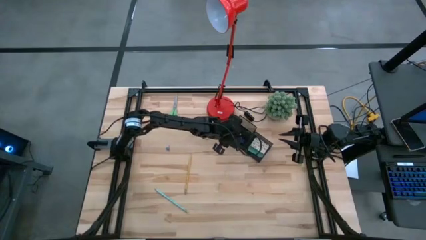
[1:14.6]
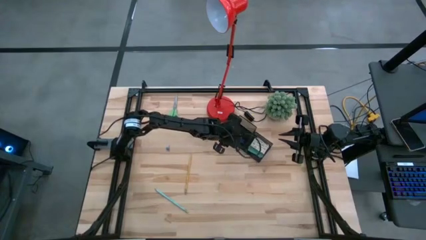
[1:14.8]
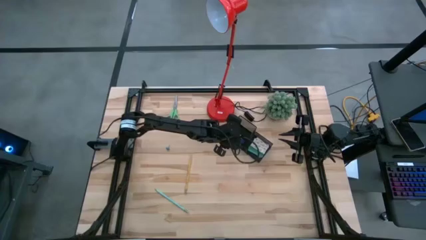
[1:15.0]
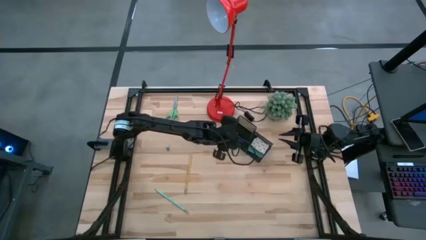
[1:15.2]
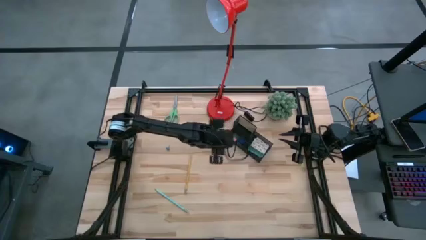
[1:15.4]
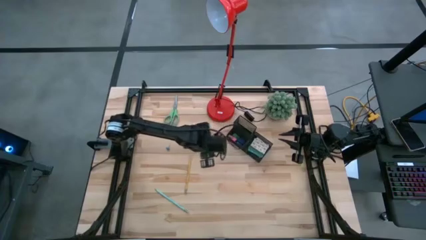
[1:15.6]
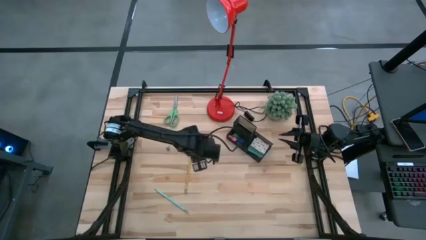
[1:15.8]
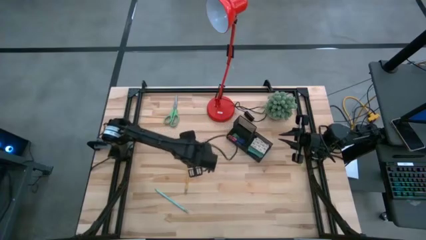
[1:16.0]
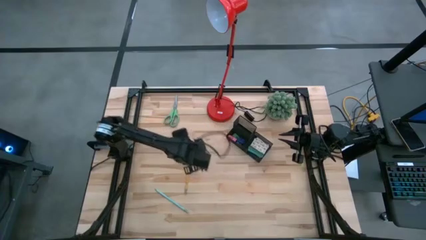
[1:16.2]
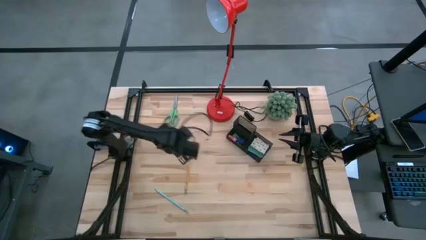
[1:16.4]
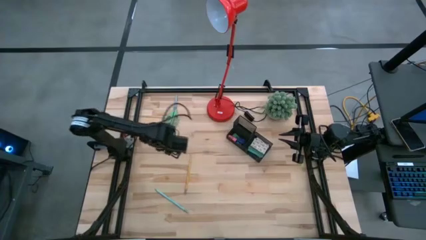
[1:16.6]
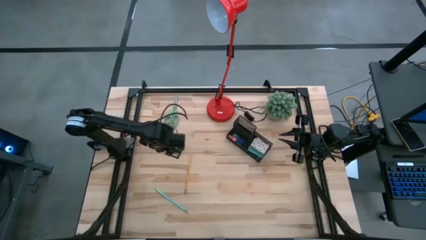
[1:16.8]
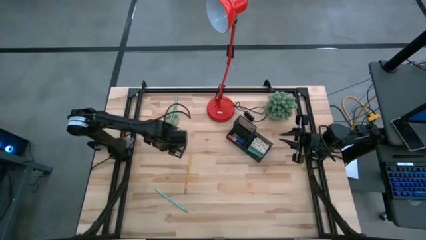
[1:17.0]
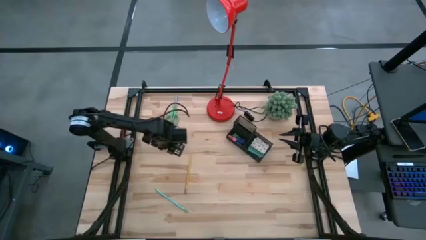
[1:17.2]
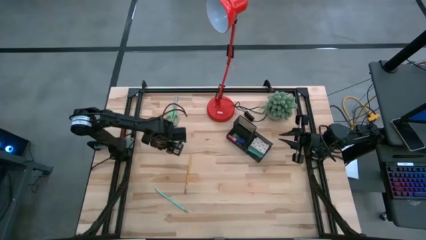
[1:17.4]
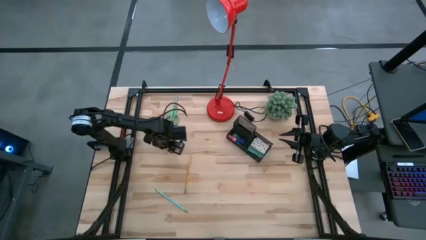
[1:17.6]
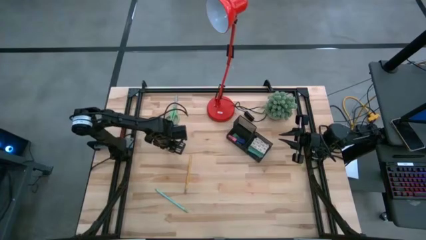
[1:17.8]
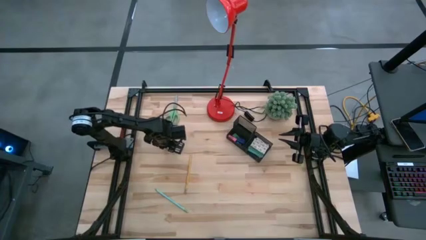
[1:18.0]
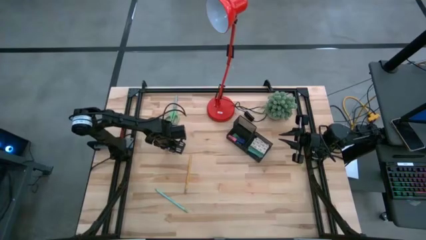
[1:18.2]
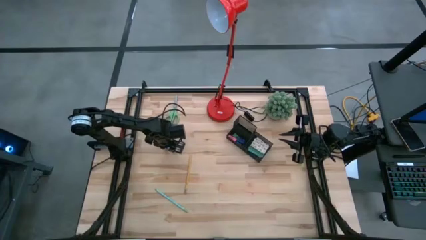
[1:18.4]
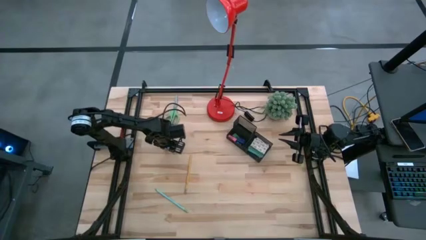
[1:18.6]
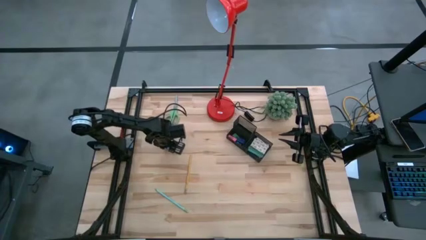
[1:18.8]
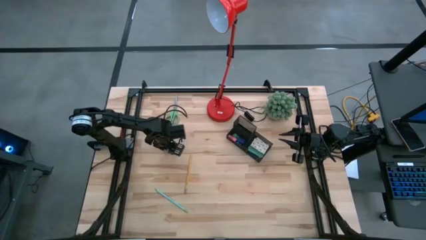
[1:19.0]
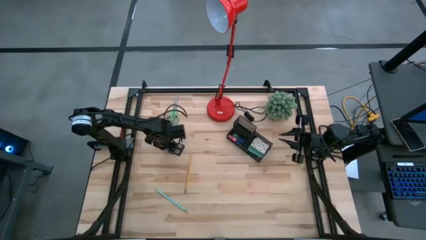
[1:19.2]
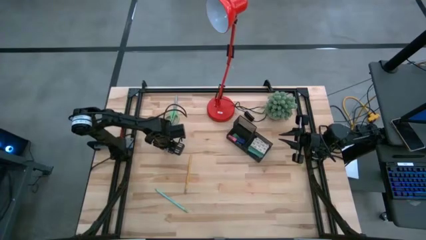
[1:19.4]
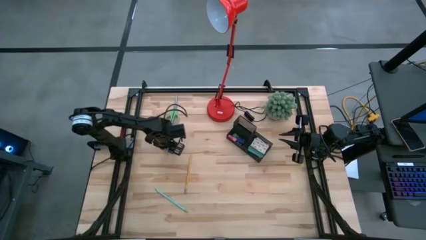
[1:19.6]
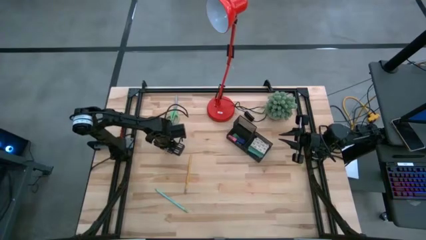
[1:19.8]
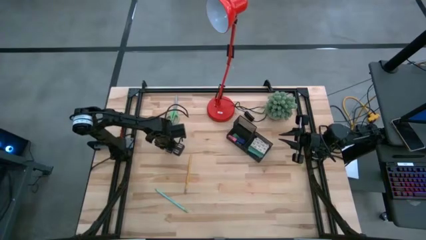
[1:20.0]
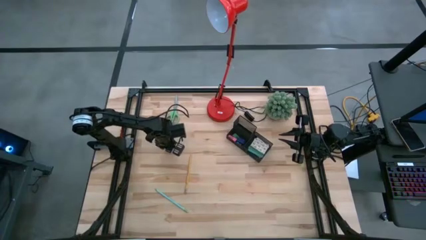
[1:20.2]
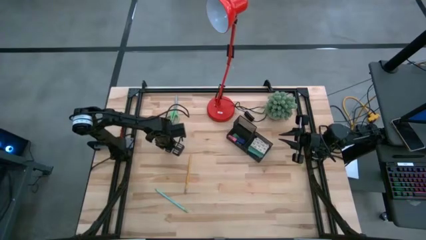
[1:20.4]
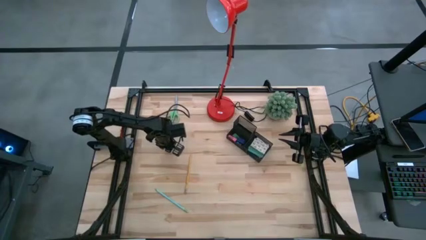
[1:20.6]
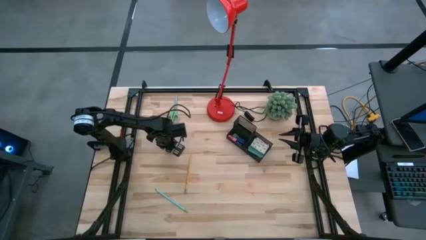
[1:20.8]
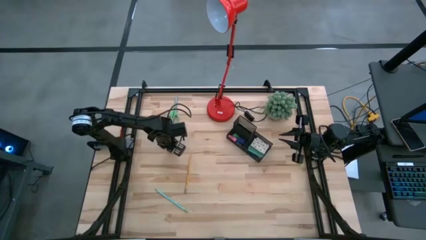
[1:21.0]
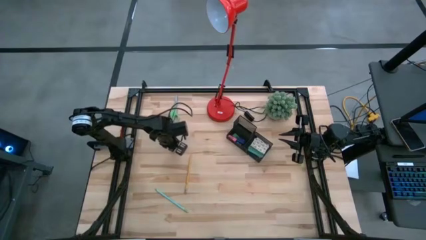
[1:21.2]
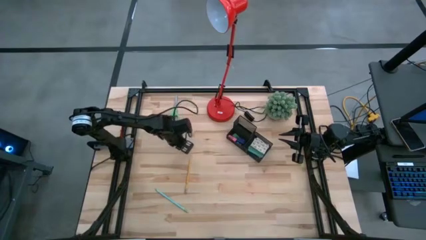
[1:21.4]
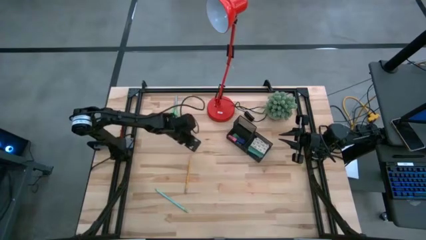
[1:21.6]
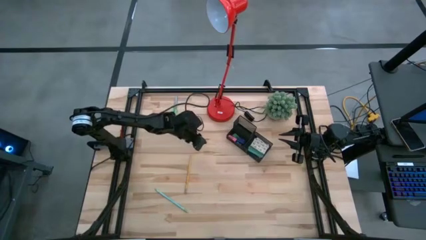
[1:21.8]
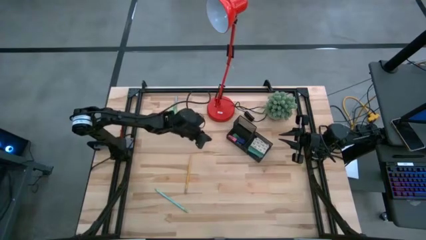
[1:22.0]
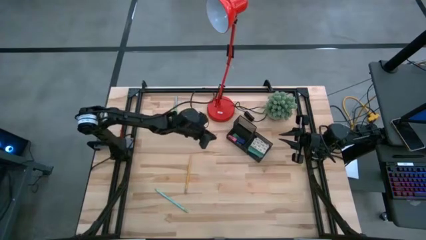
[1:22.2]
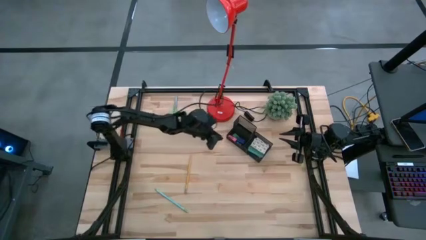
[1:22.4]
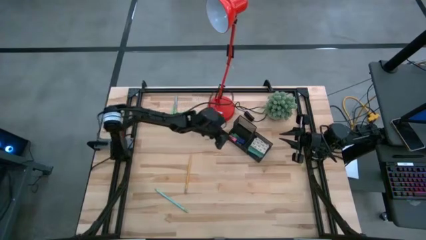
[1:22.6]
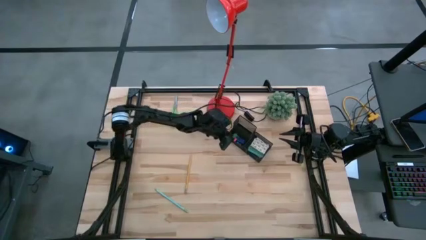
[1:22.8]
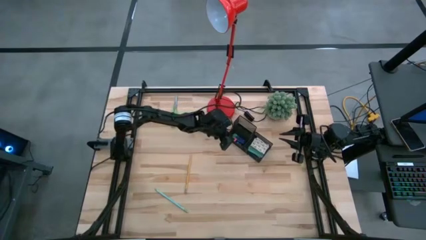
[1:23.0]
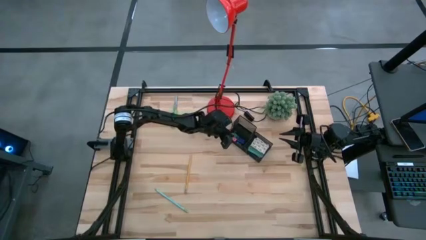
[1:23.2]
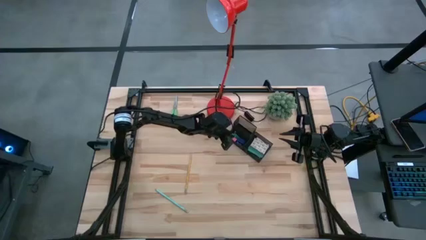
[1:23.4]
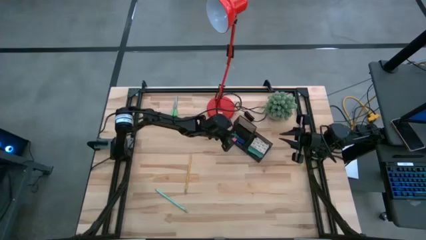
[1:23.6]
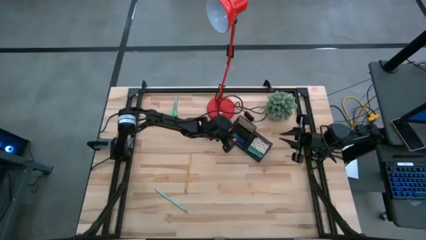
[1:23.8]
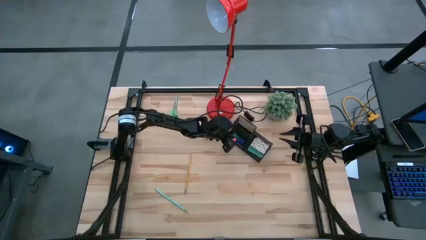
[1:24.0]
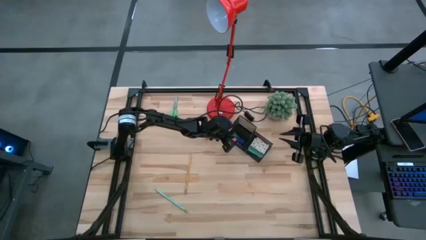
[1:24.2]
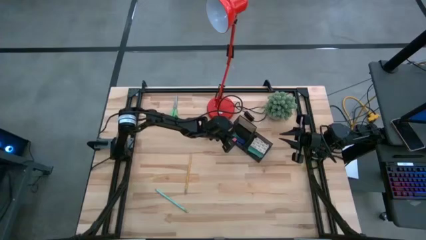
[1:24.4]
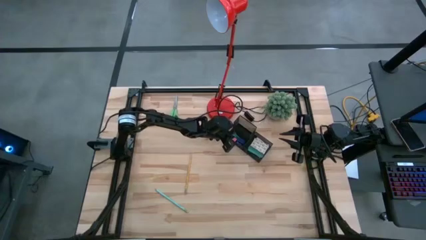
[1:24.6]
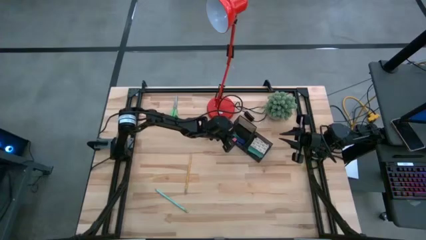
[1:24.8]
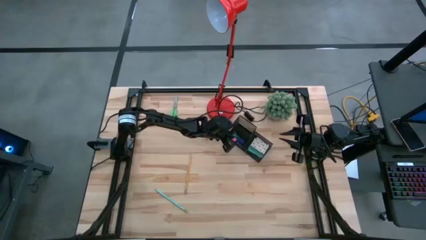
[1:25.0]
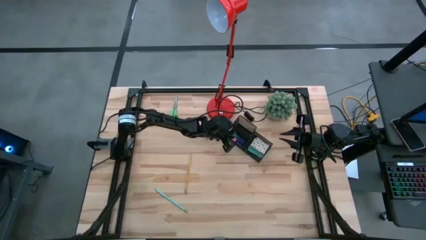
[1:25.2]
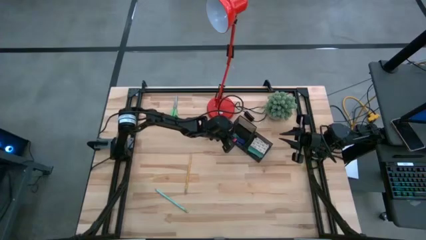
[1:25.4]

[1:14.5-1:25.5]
Task: Pick and place office supplies into organizer
Put the binder clip into the desk organizer

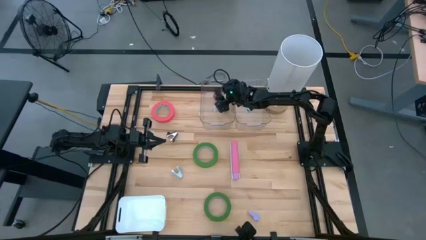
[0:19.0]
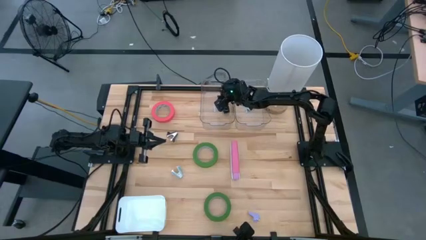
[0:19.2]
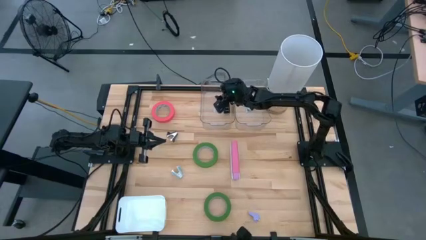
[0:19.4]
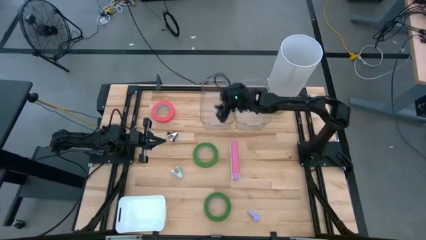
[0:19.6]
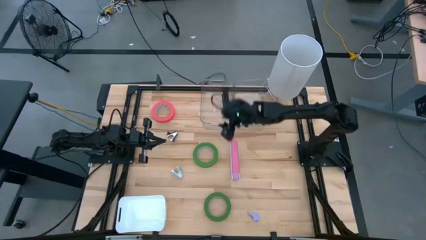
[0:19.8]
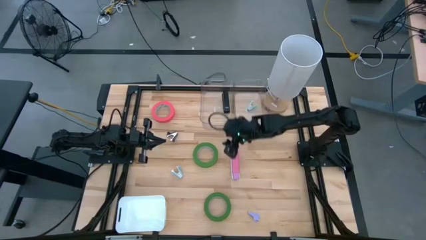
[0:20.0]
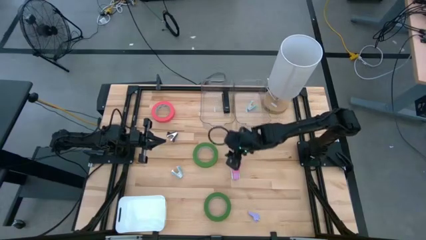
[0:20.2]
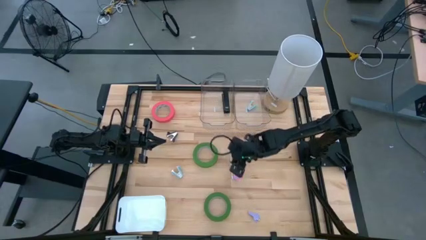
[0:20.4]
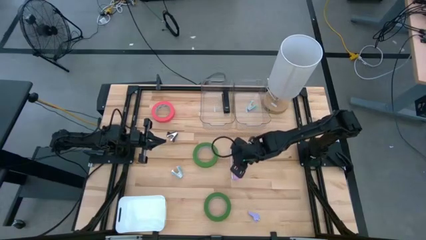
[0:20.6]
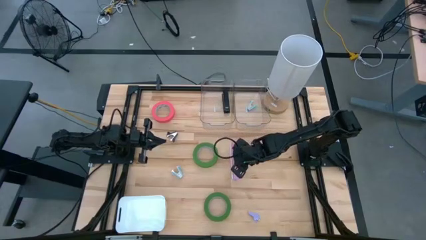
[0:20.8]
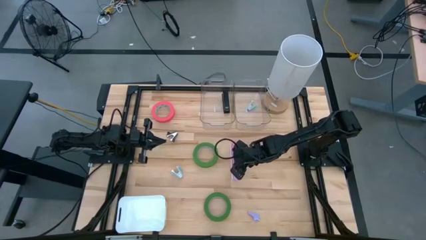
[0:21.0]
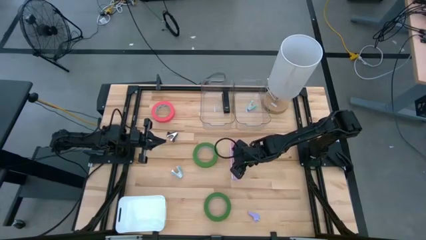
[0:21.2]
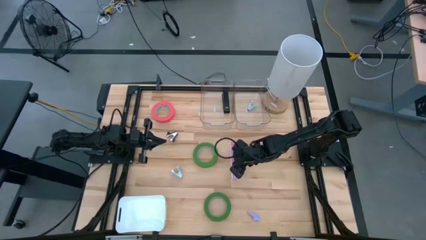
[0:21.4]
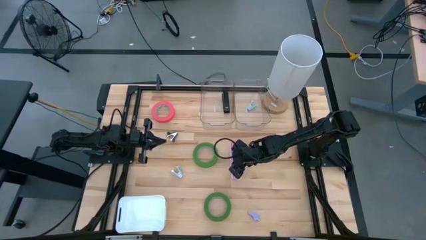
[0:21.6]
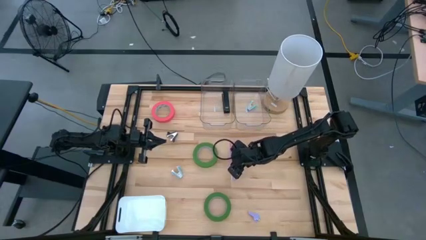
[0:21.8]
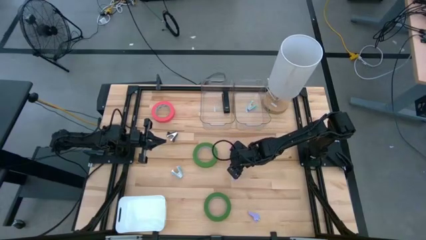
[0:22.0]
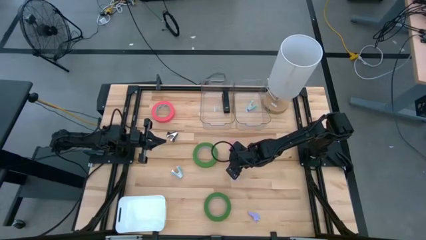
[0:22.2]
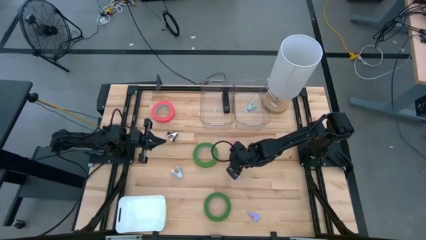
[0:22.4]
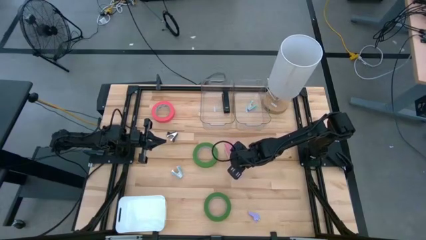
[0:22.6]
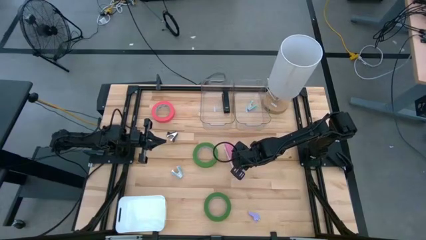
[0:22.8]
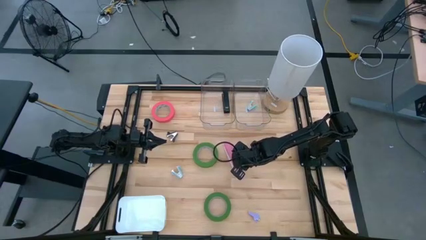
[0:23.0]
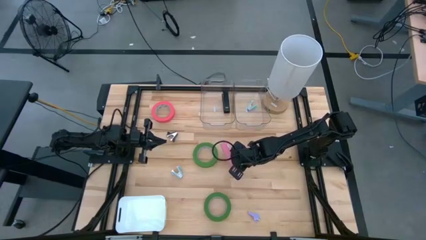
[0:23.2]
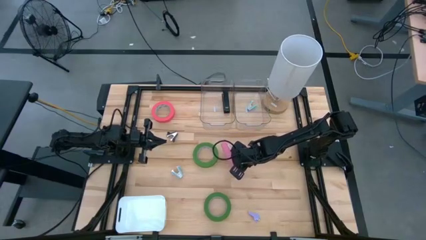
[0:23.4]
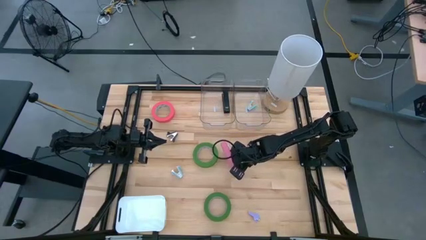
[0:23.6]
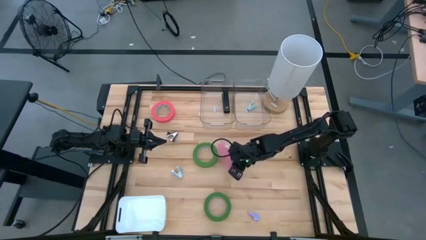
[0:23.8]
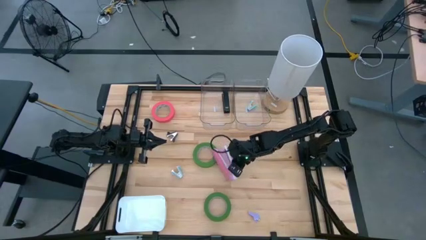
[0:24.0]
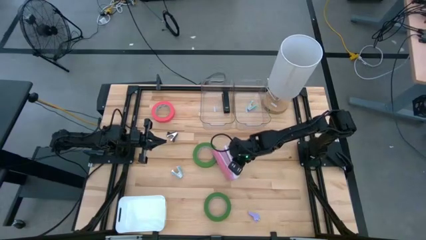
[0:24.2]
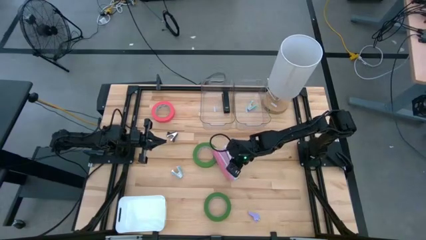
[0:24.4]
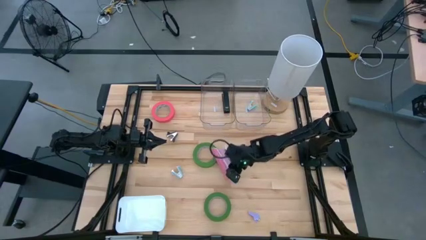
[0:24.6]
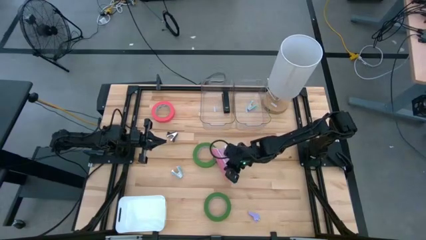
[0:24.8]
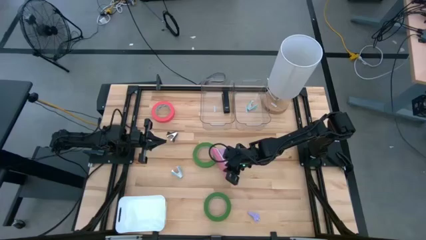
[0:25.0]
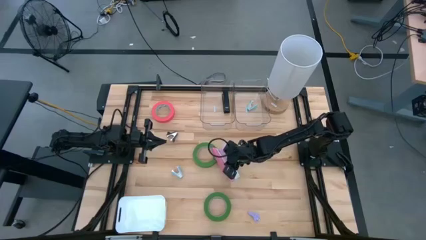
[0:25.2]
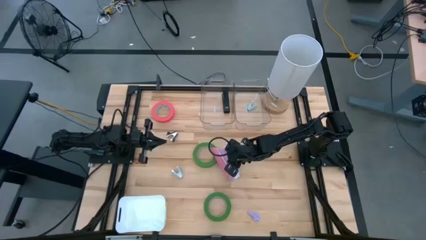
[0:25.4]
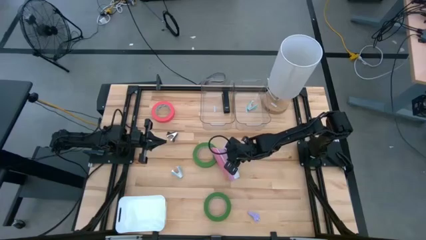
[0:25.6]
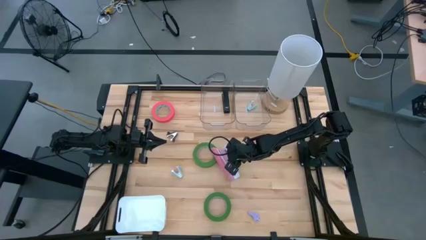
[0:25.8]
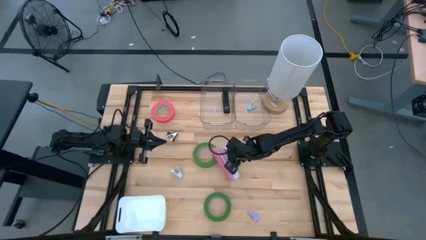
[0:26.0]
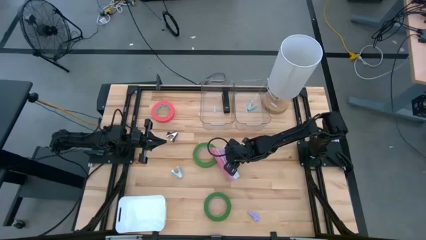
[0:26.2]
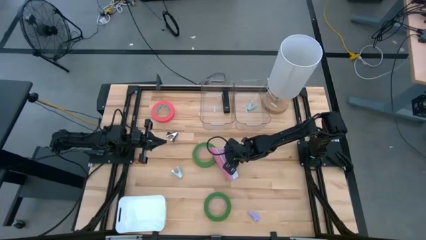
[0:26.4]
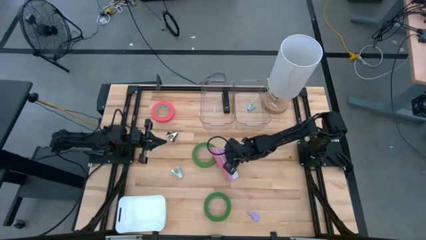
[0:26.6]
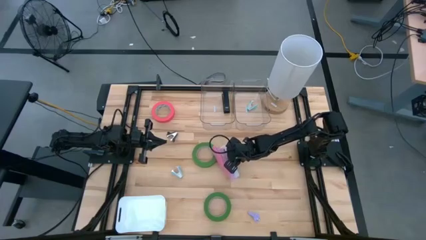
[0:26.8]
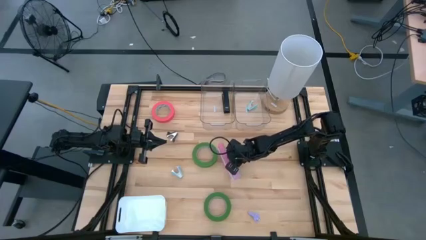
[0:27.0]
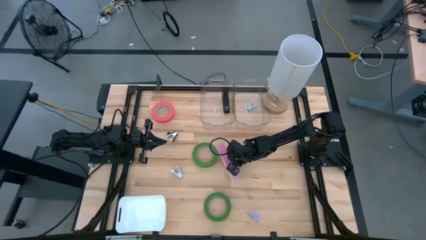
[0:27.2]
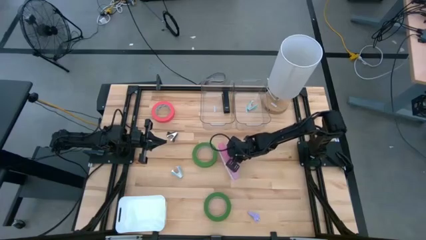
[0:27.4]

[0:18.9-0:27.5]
Task: Pick and place Stapler, Stapler remover, tape
Put the pink stapler into the left transparent bin
